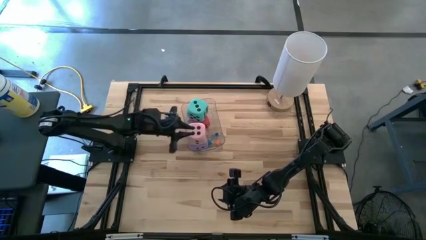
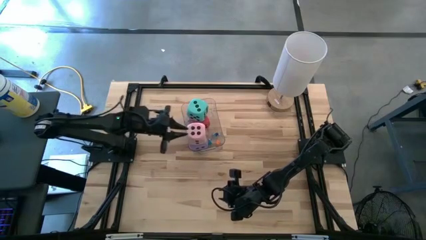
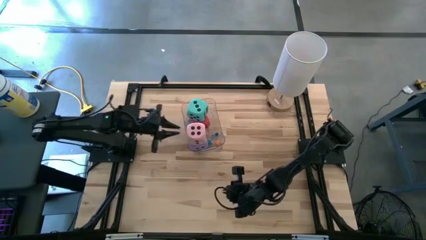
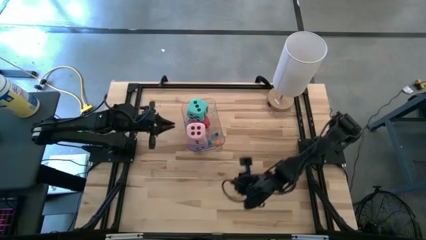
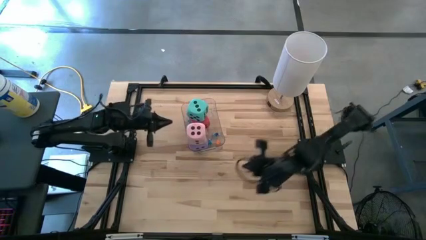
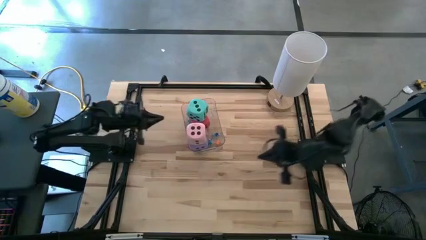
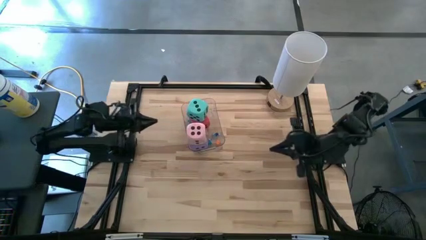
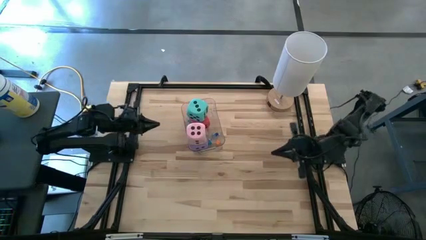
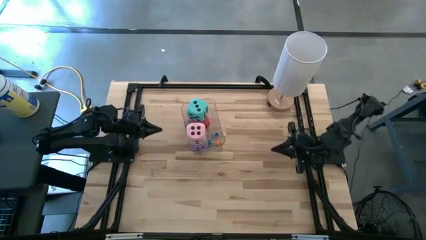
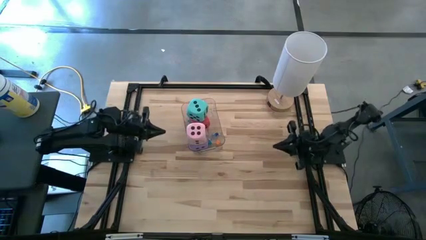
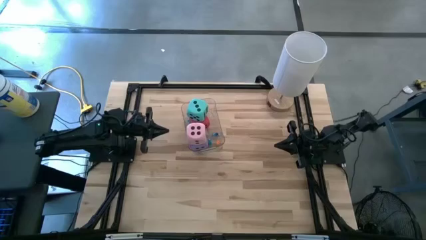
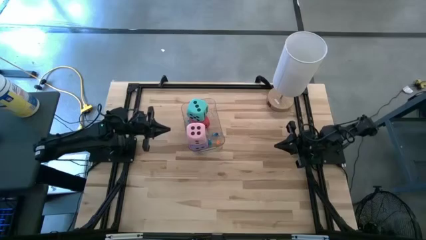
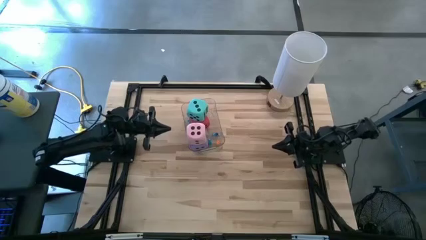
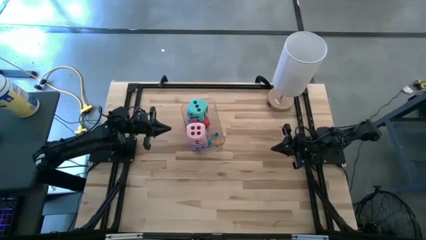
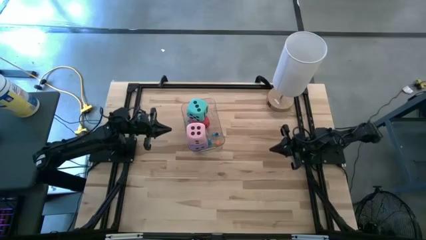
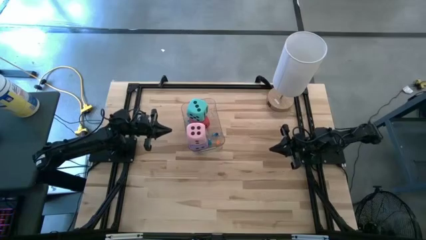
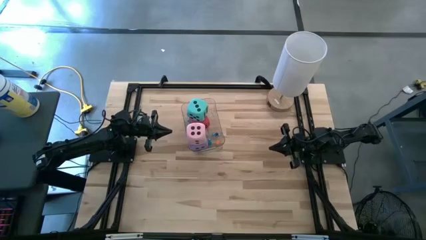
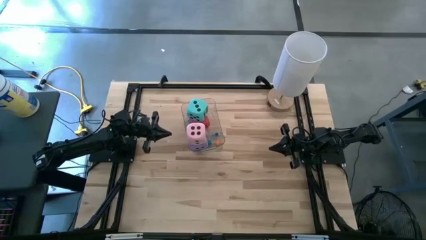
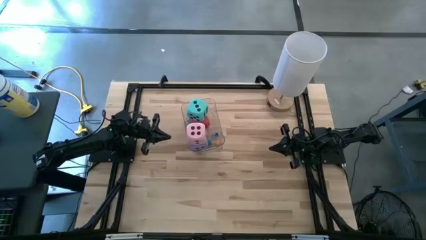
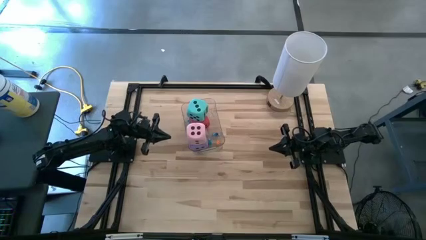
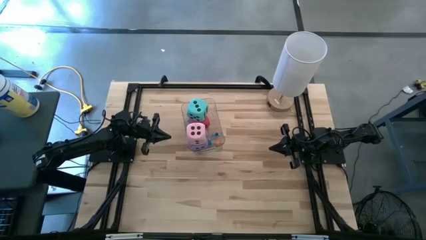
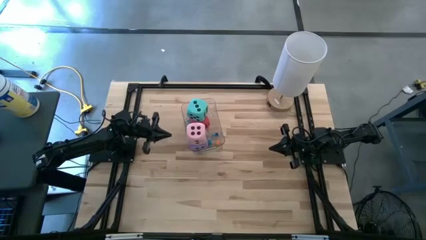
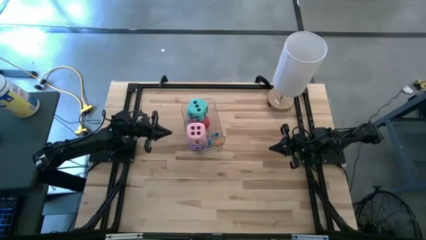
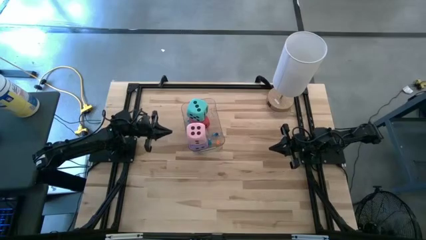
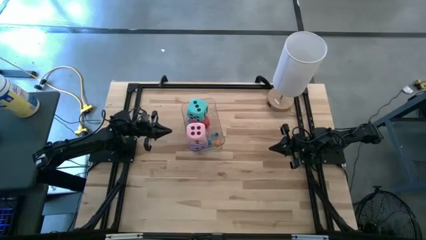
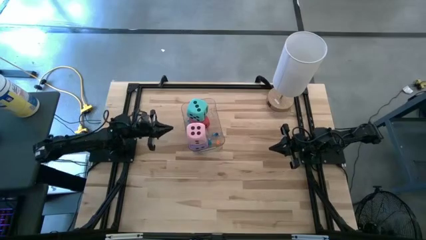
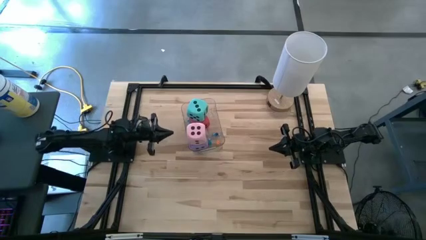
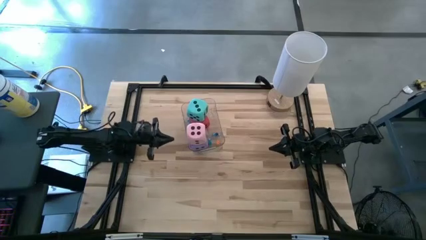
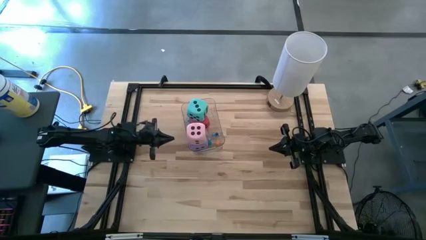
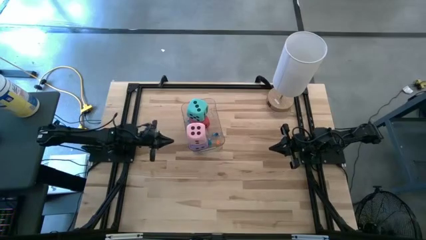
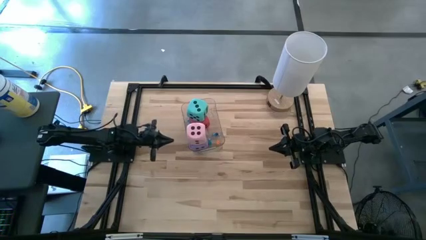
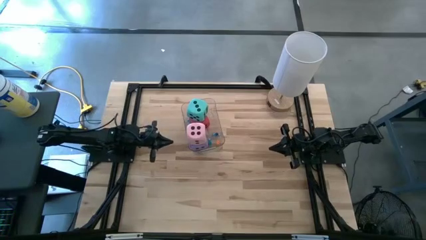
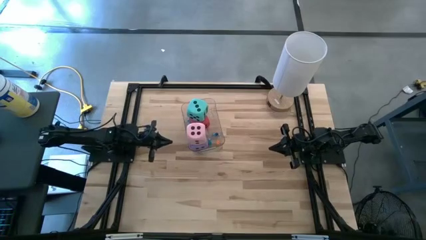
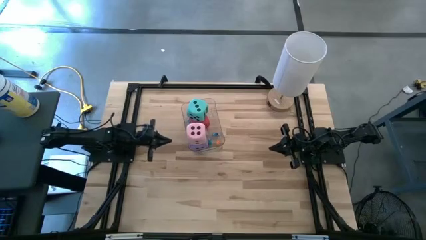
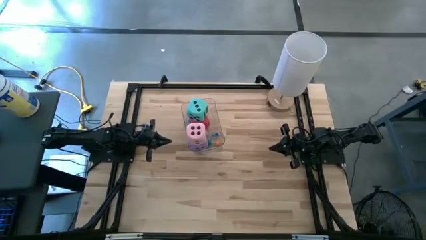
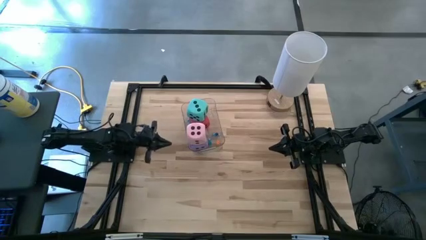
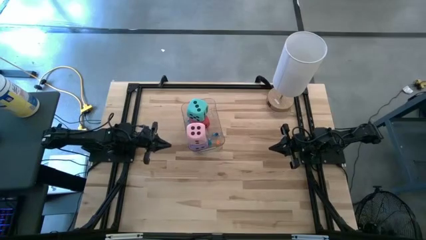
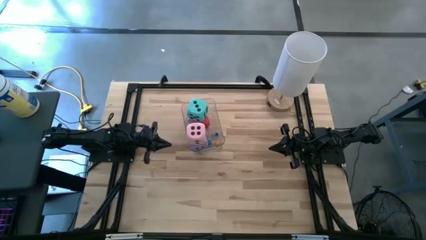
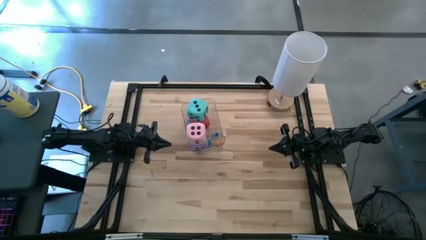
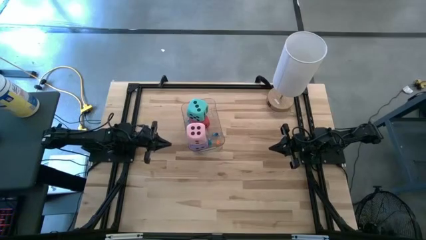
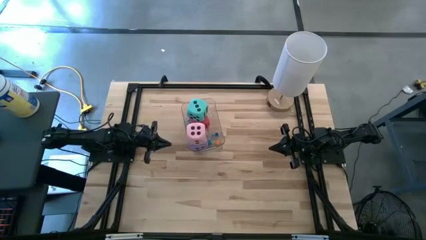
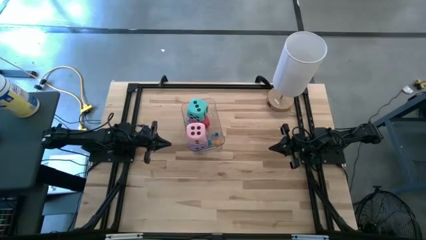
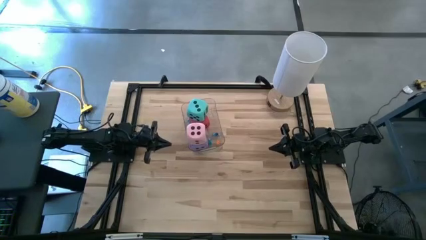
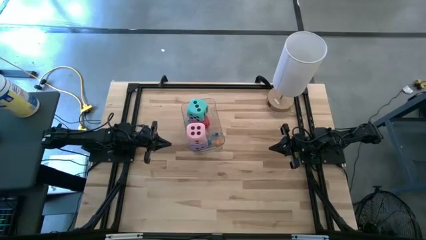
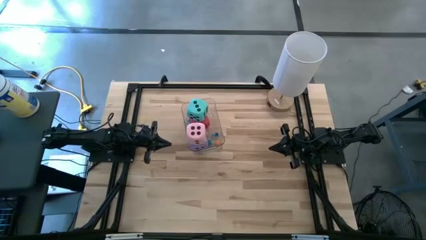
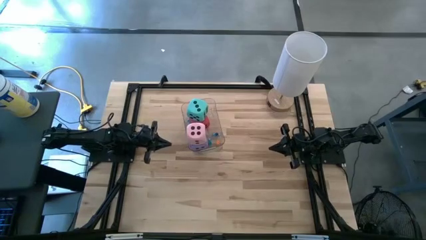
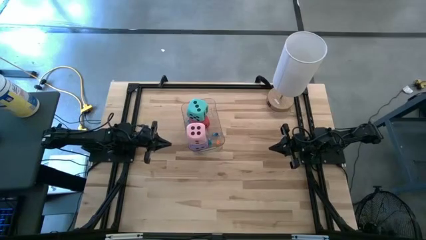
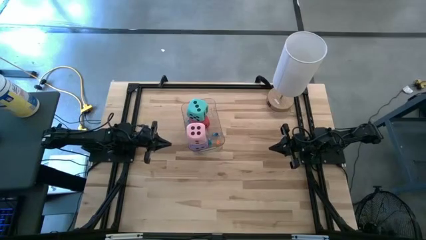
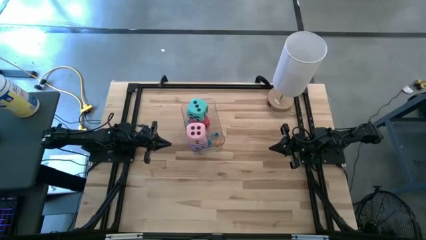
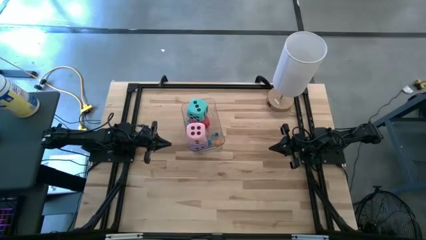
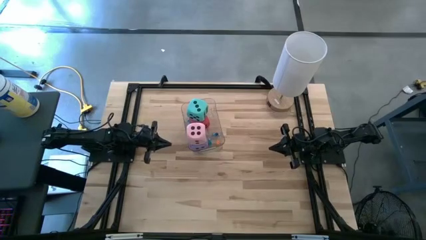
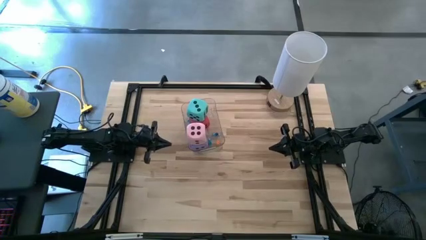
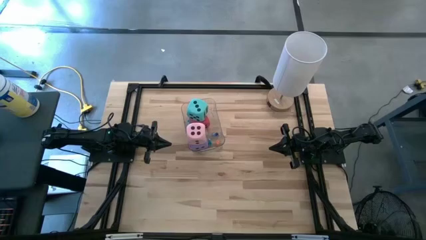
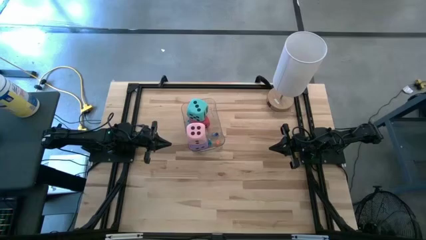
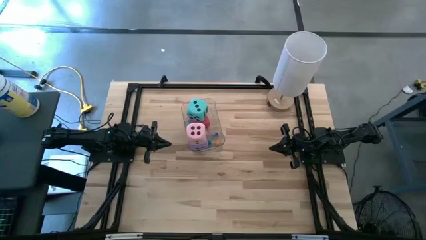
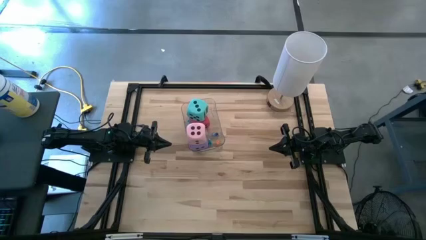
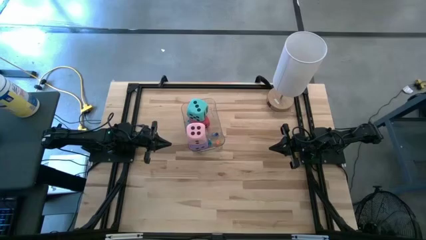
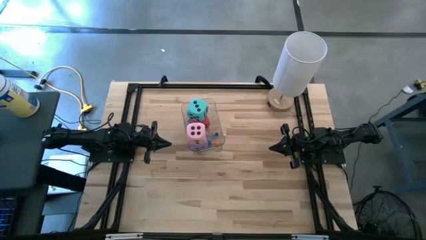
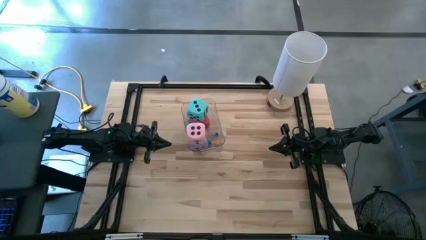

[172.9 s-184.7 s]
Task: Pick & Place Dice
Return to Home Position
